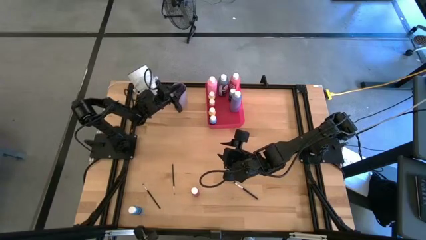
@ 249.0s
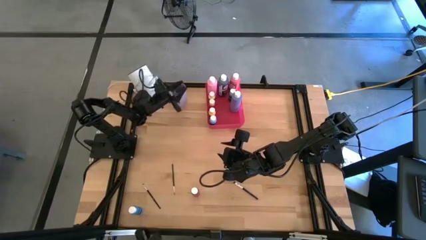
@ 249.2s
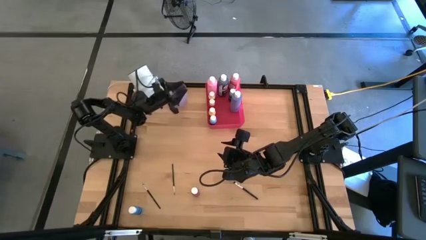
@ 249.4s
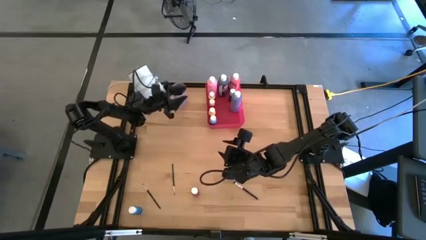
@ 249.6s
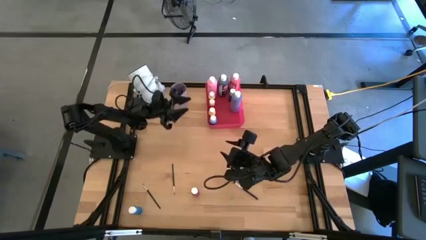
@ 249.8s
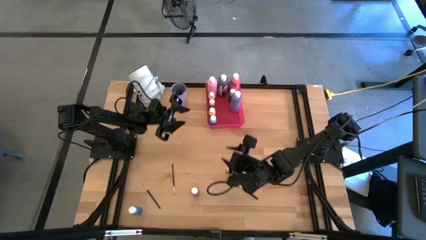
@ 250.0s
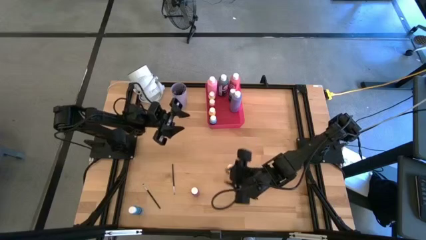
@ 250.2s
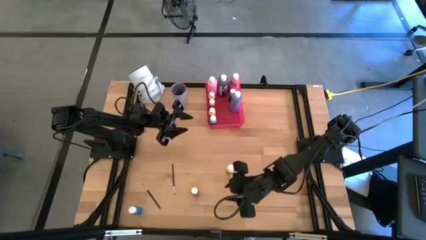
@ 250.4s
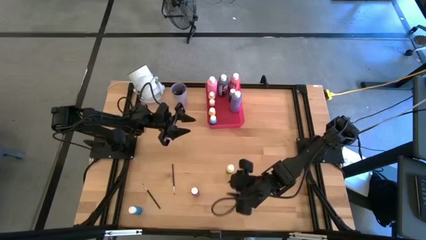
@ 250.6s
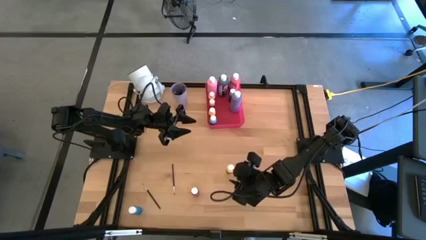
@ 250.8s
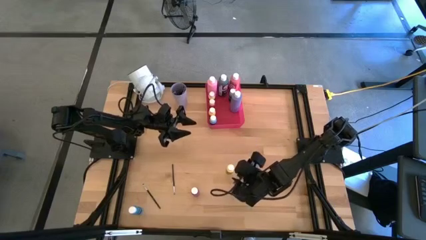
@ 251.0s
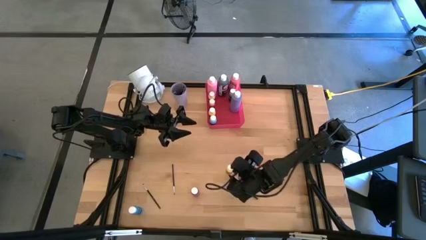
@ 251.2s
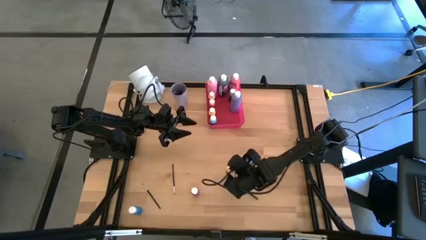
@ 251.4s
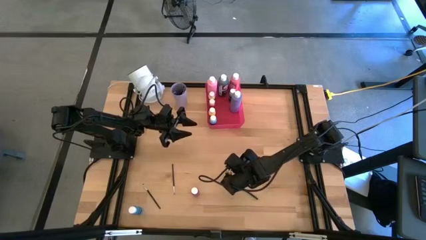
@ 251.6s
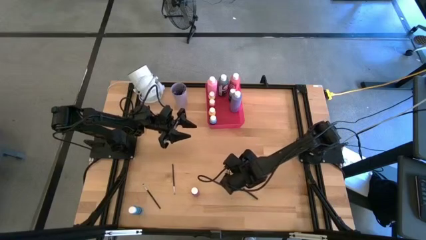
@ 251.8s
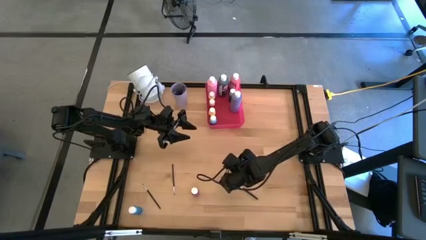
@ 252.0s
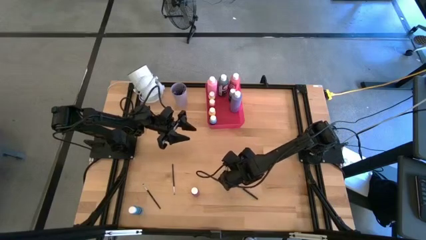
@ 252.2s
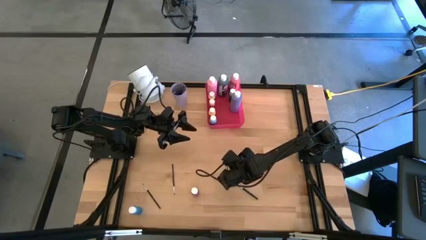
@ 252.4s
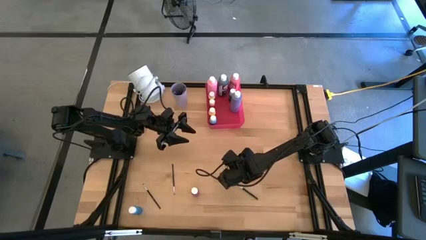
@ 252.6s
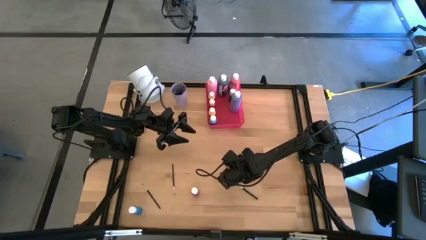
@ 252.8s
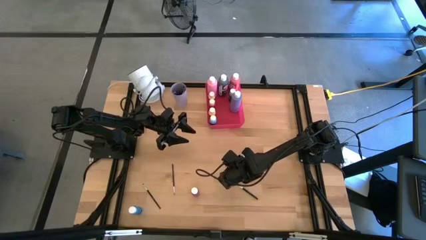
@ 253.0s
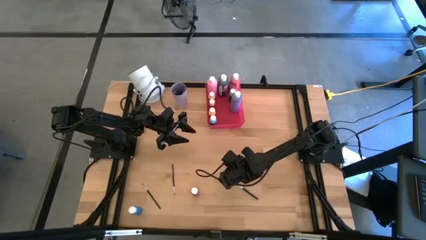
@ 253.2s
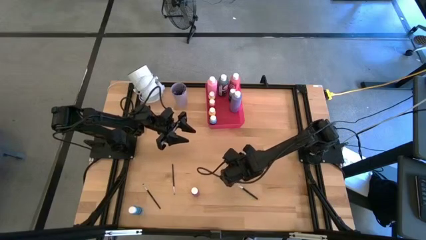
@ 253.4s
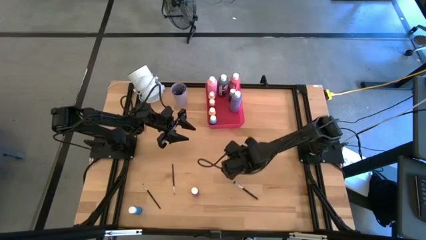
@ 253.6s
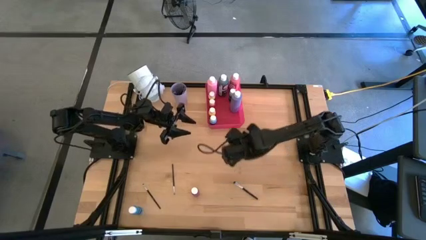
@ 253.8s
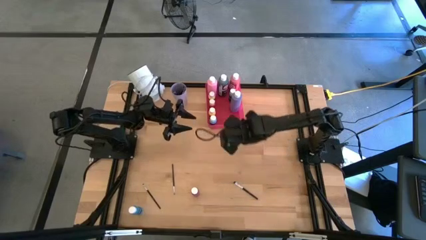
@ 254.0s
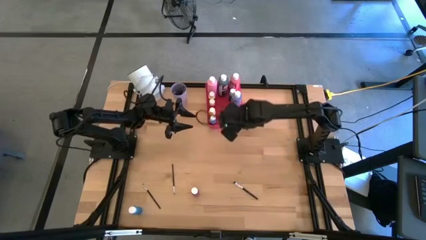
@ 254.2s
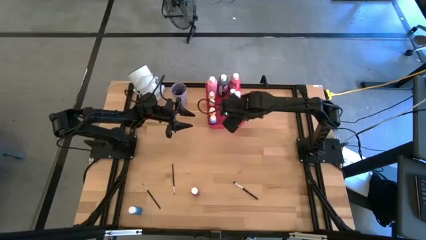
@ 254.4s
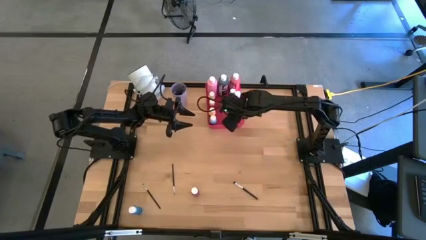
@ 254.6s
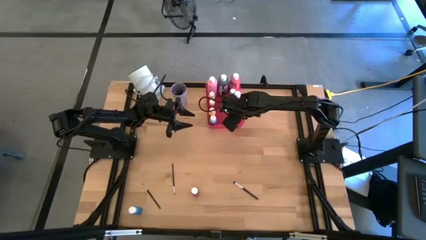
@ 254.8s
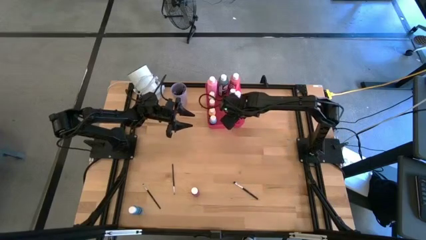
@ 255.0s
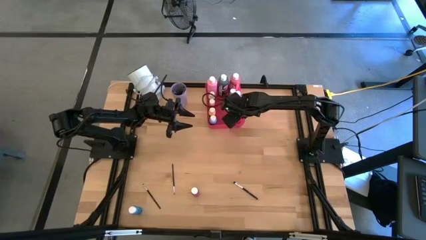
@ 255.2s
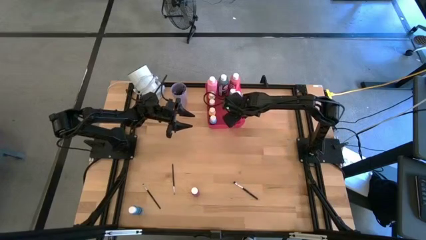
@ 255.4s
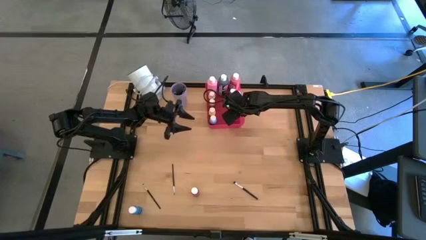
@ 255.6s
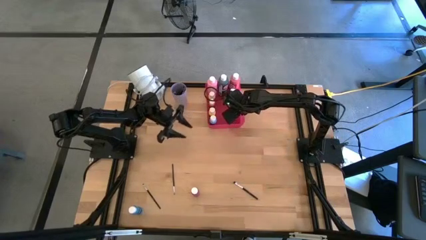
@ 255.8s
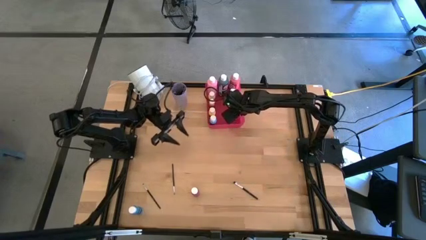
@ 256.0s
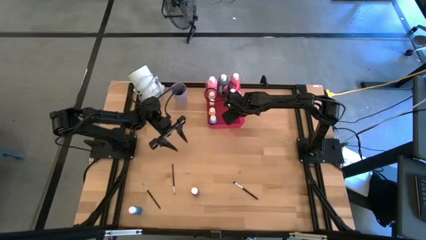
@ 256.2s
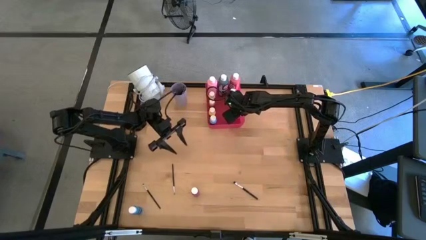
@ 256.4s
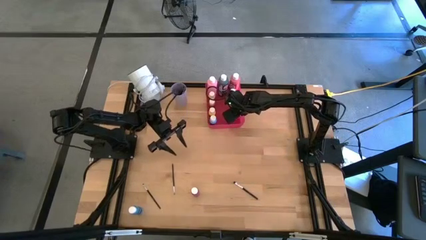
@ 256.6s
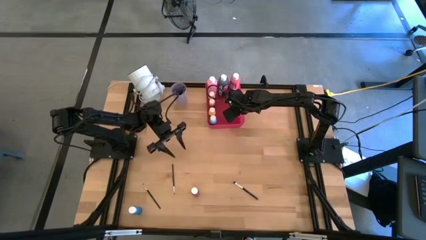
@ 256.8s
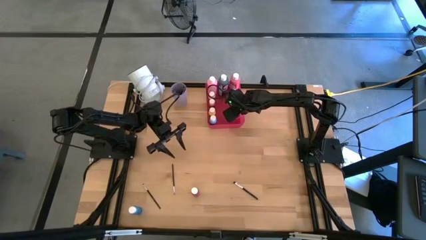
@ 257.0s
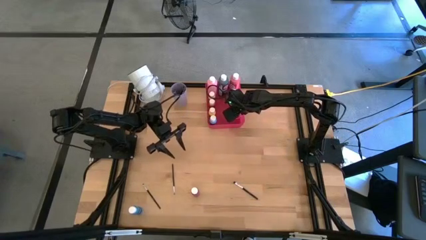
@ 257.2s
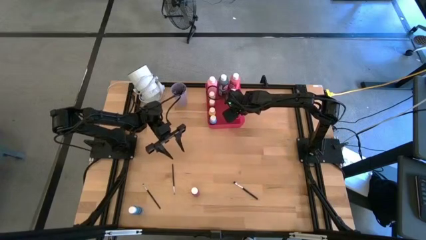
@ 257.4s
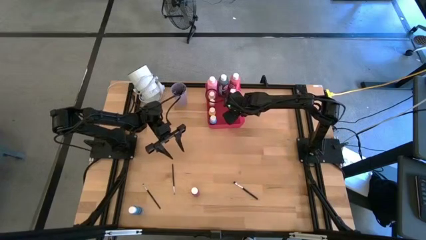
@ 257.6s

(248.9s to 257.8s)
Task: Pick & Place Paint Supplies
Put the yellow paint bottle into the red bin

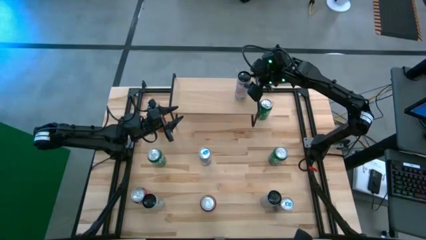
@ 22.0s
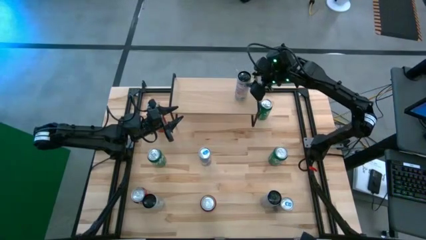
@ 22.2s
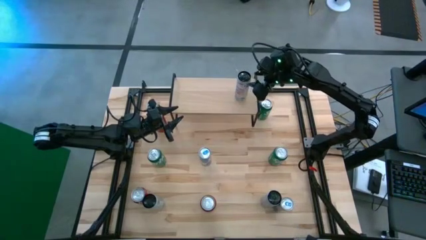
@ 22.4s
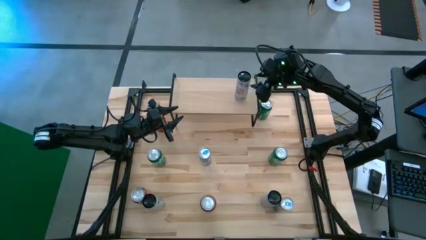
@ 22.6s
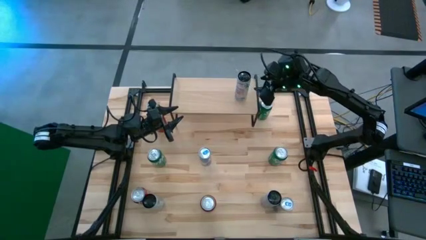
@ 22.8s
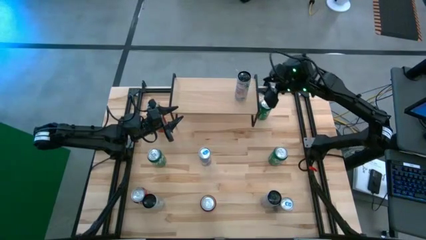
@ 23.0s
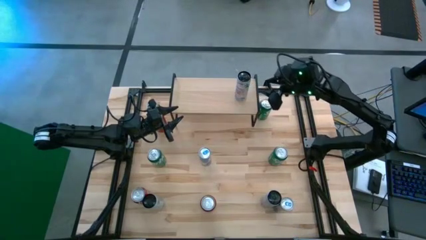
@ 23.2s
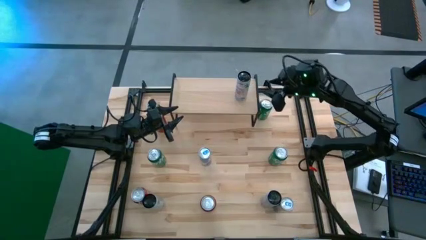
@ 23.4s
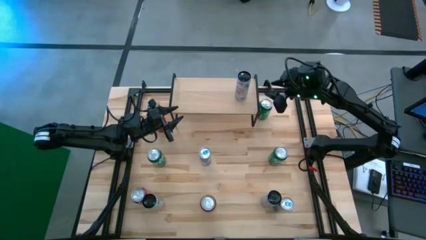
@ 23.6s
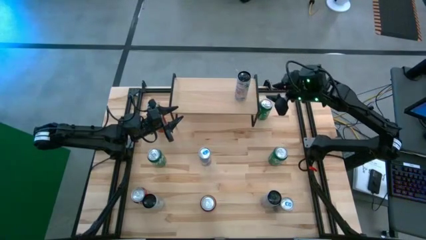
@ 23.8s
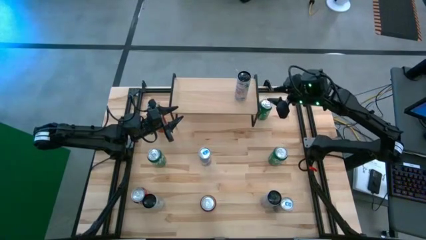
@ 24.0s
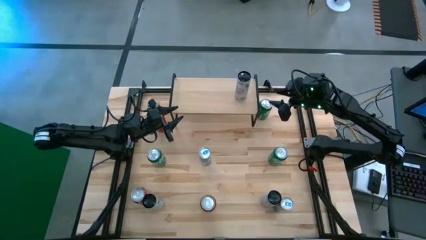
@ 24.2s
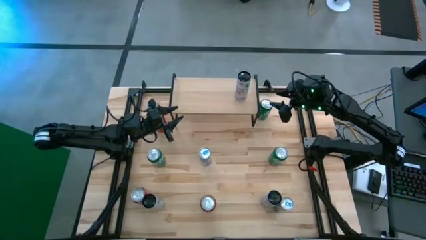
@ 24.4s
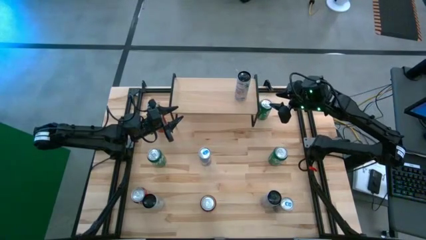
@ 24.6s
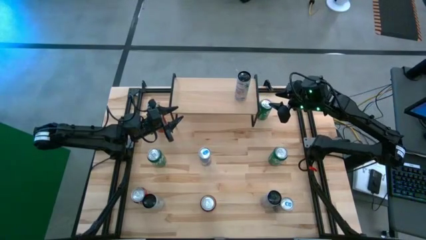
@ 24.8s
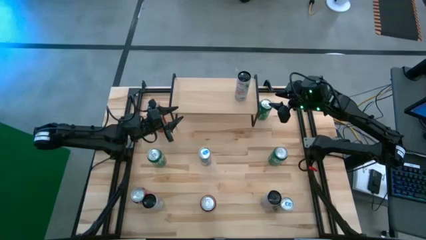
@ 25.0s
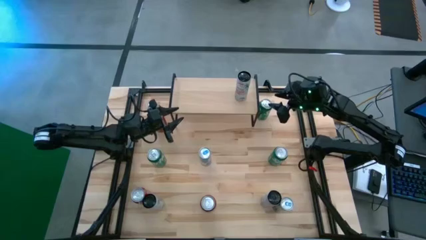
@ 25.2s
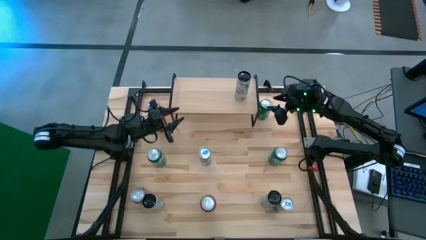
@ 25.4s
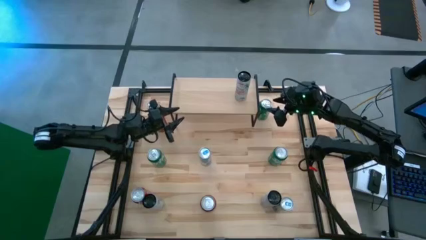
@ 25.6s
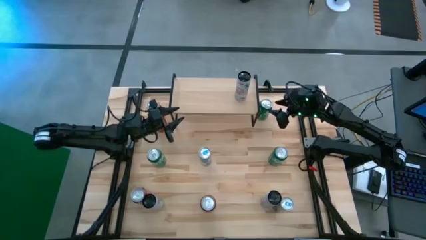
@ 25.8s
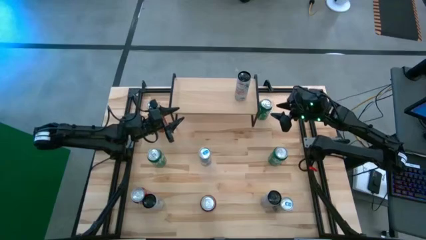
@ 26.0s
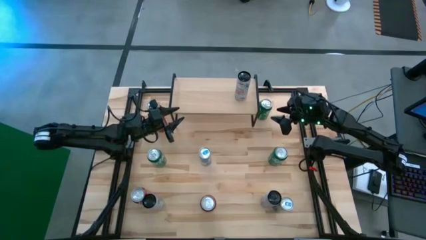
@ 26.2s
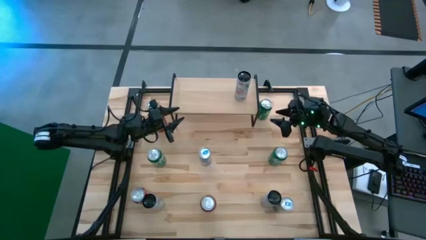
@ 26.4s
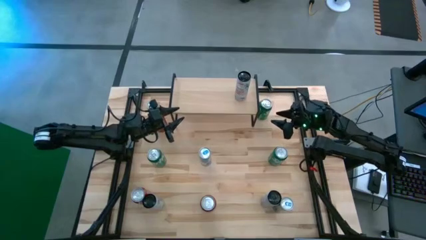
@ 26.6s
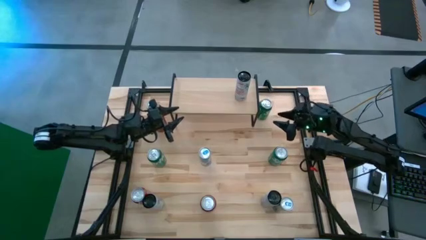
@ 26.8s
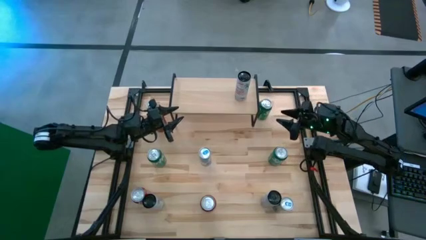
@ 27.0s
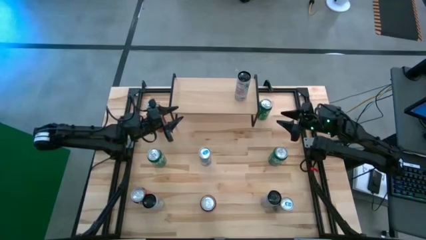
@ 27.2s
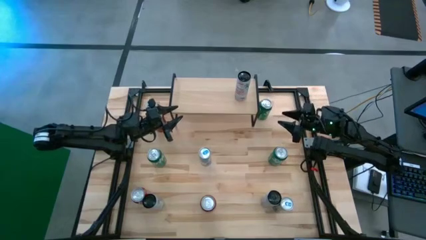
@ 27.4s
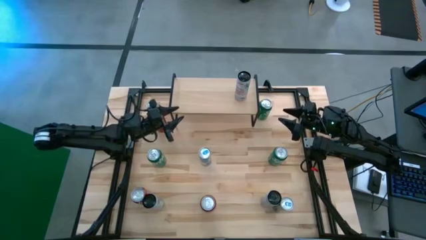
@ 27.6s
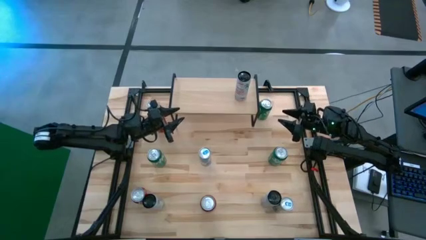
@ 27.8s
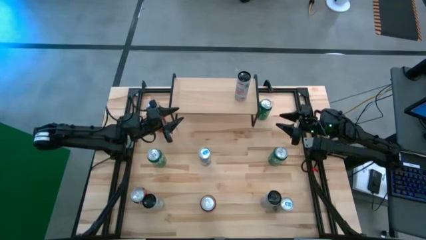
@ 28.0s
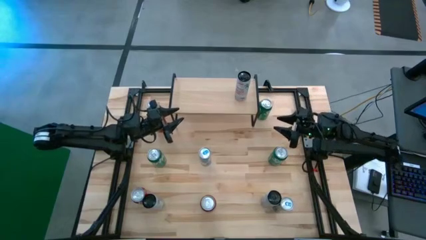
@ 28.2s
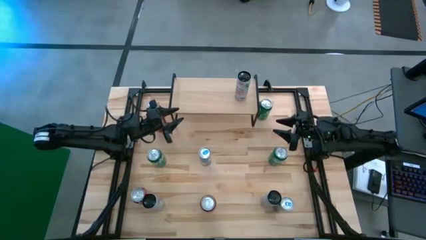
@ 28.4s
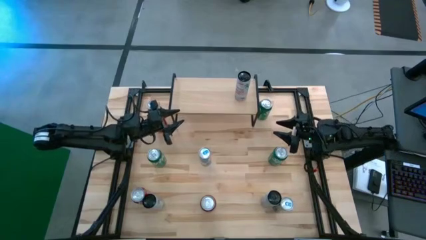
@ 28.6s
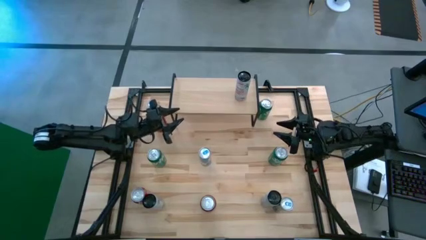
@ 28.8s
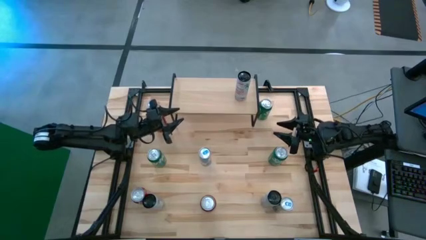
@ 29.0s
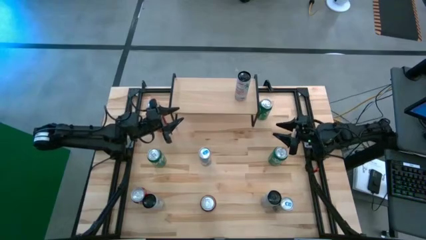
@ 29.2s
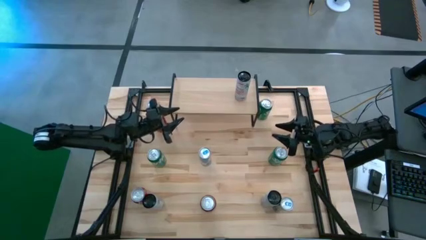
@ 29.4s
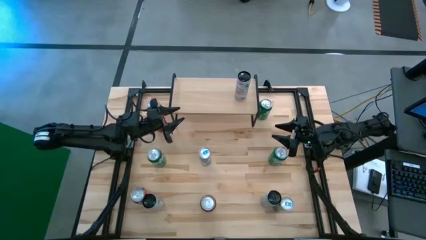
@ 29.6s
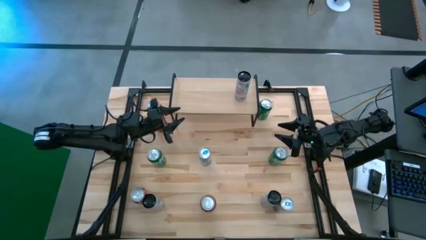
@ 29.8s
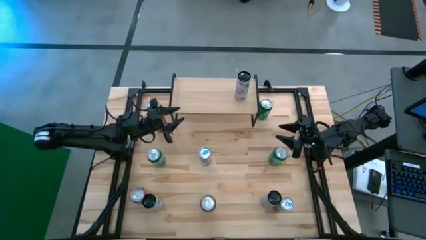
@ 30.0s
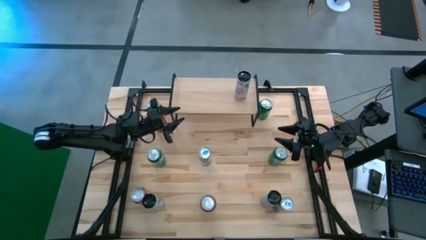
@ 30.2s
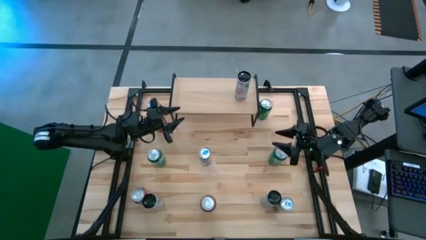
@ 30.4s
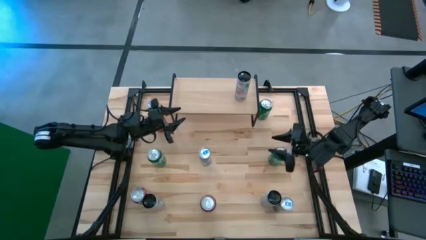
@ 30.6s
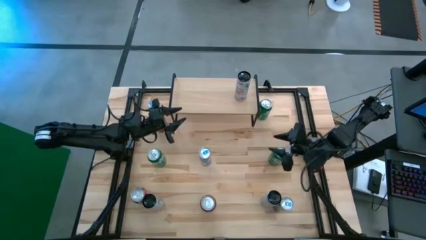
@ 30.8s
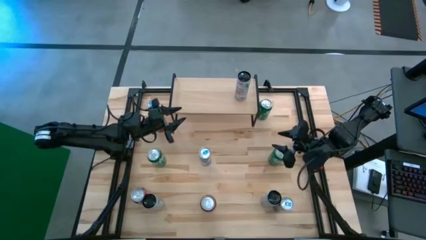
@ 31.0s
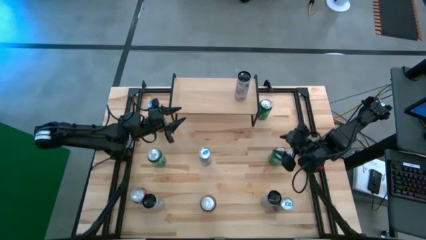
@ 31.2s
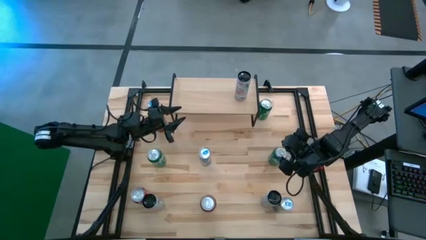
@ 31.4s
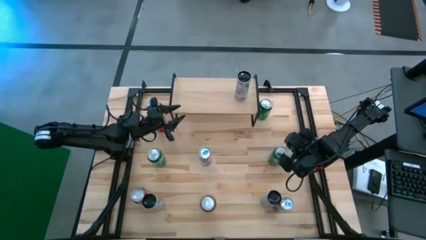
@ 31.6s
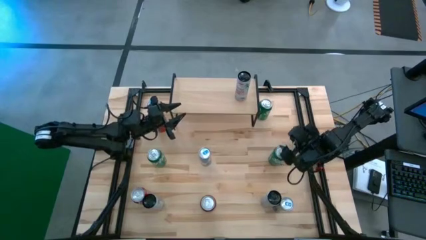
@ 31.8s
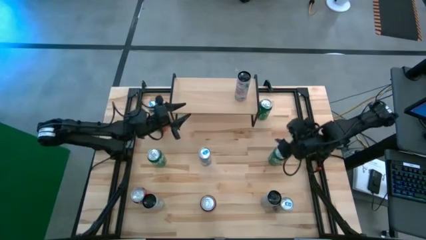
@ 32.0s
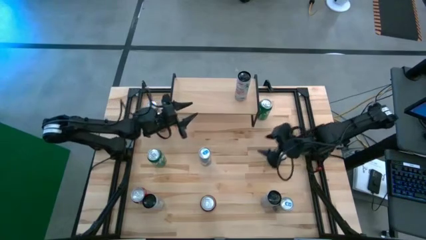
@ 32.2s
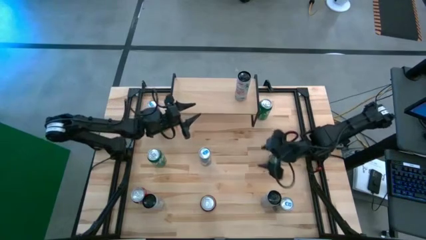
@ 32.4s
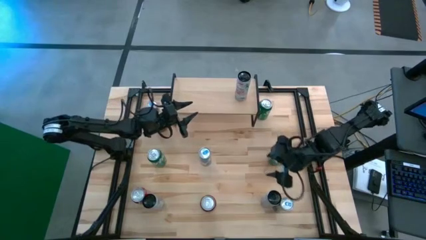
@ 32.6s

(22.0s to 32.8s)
Task: Place canned beverage on shelf
Put the right white pink soda can on the shelf aligned with the other white pink soda can
